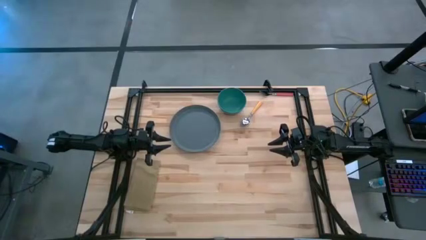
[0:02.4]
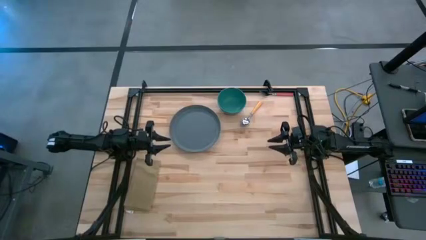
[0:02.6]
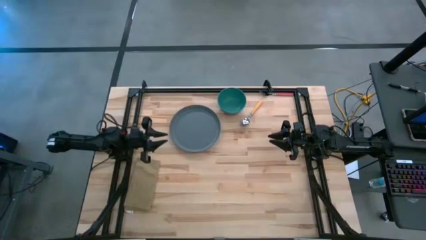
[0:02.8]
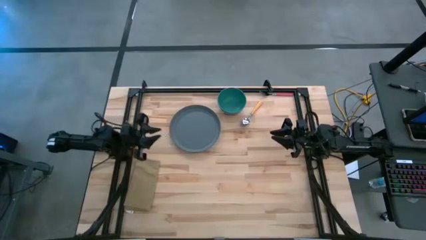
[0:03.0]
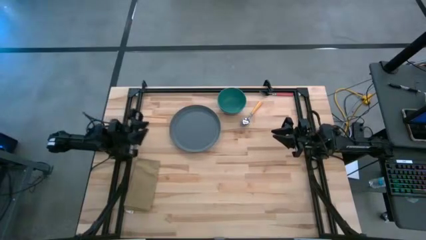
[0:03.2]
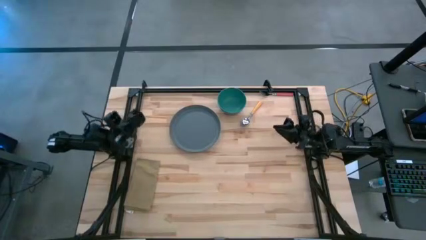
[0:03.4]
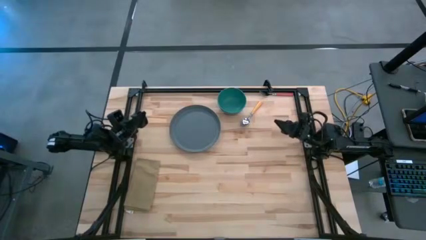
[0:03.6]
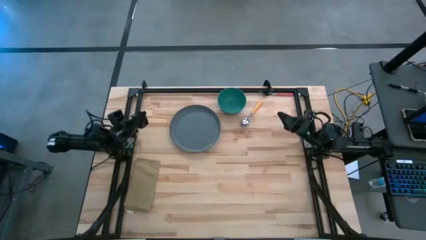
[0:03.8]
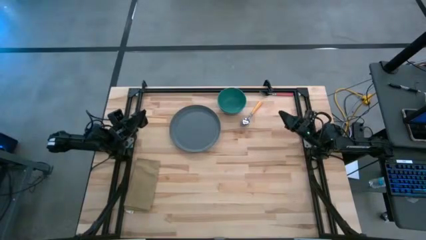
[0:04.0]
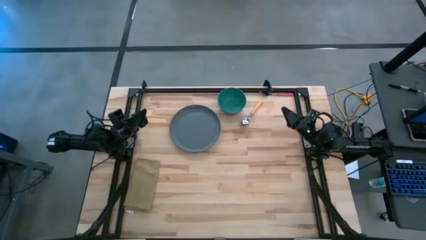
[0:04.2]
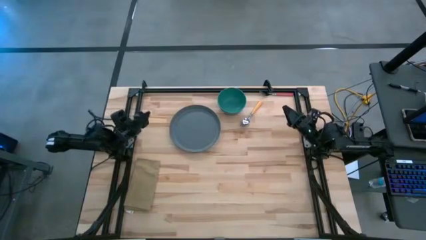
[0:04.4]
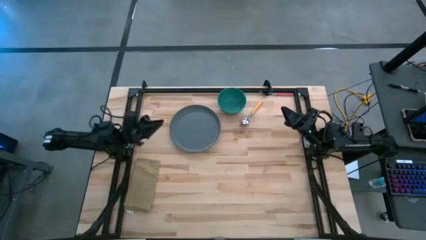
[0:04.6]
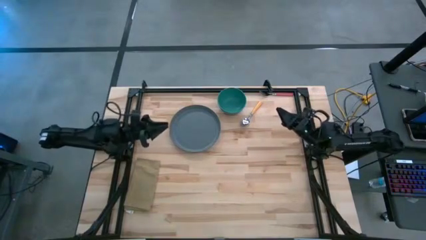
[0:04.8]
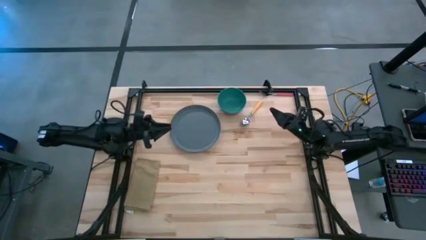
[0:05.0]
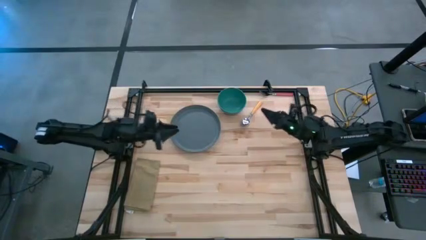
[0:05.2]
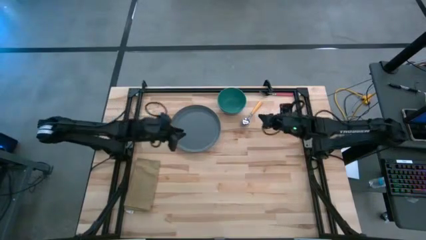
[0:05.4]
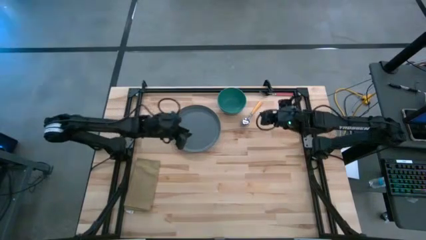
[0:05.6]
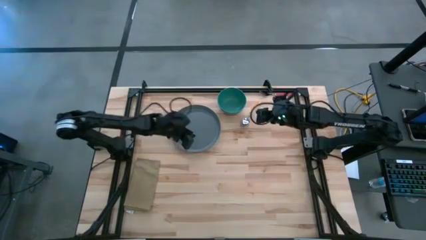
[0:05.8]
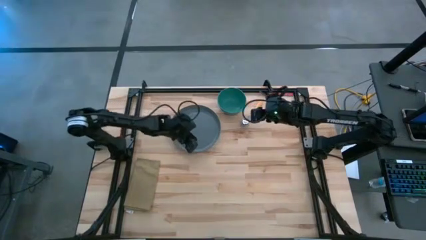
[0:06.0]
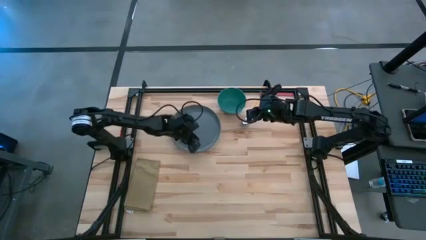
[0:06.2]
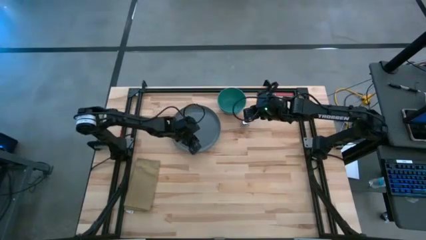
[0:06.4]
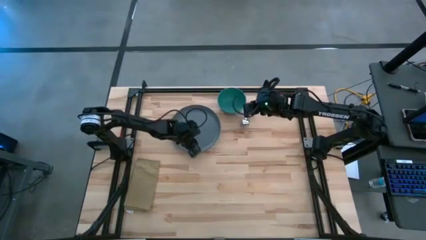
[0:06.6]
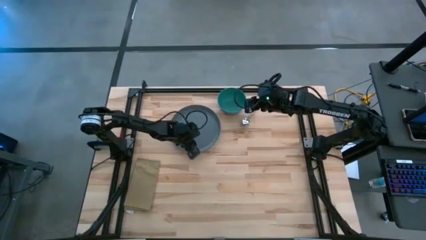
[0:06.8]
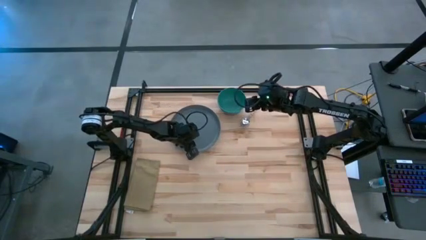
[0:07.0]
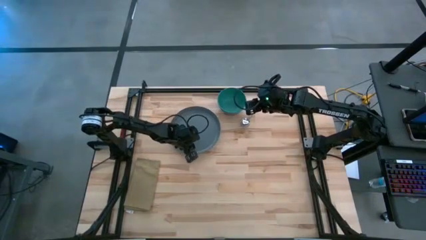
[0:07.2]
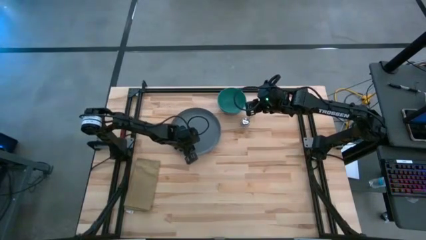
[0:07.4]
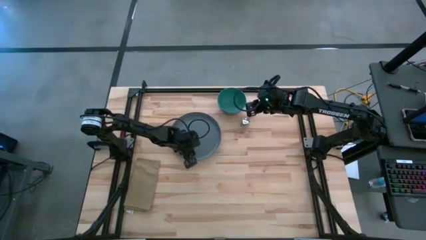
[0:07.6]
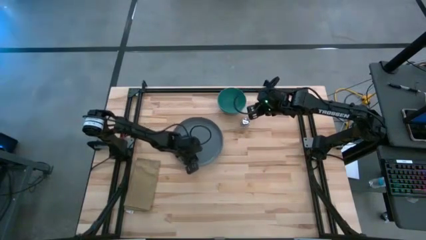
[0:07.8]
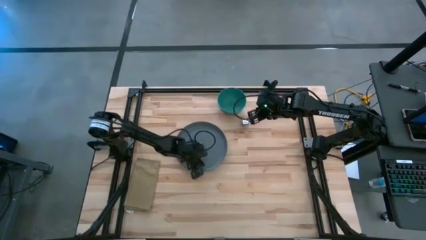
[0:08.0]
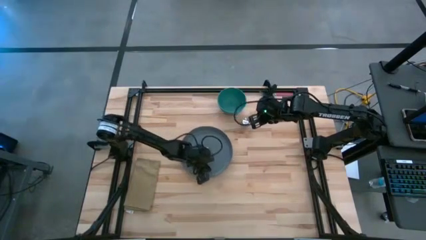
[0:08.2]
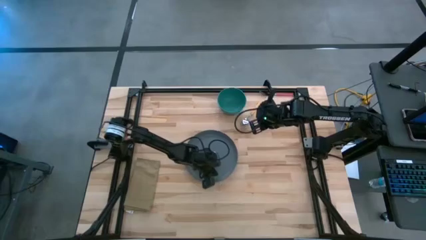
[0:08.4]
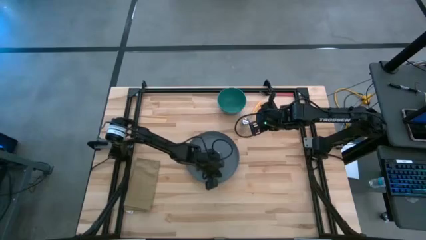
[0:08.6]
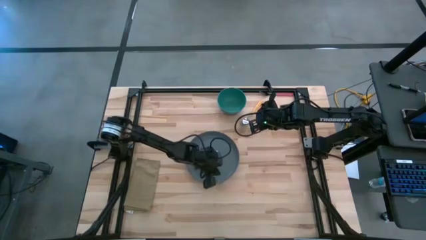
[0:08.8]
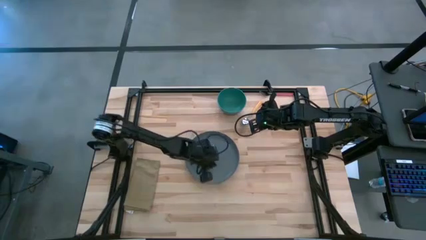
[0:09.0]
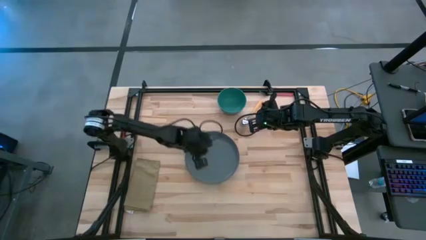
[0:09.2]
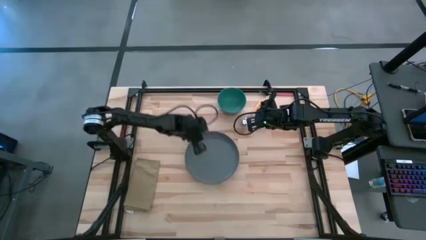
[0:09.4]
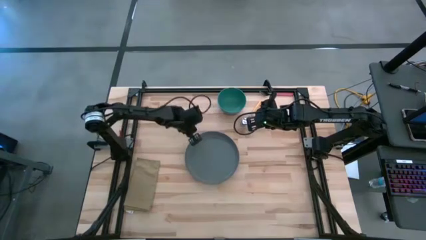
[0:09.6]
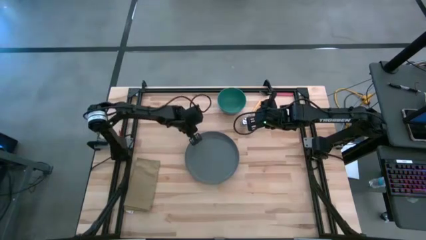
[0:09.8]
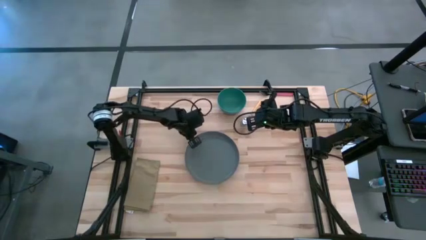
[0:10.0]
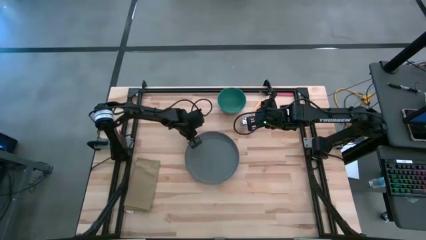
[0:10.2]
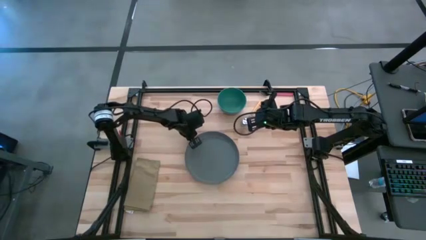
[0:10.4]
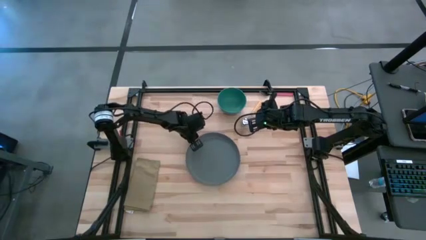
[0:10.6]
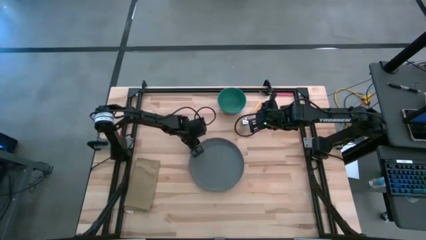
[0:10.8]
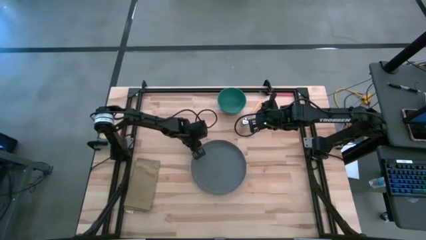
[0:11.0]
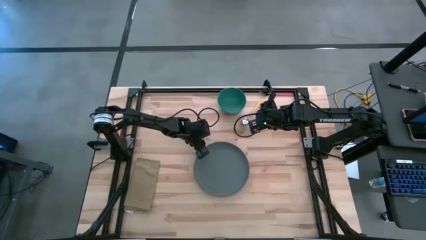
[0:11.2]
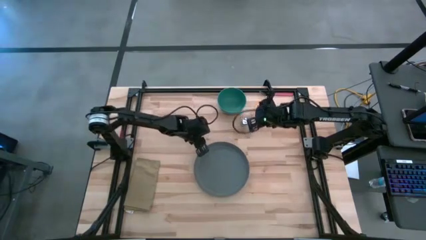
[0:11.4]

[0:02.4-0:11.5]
Task: Set table place
Move the gray plate to the center of the table

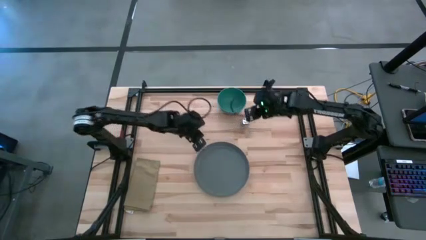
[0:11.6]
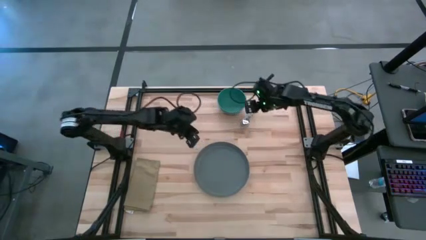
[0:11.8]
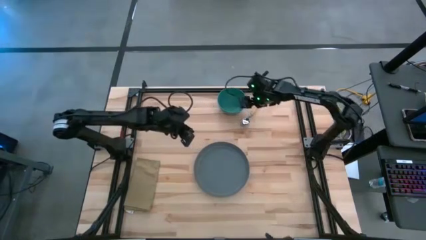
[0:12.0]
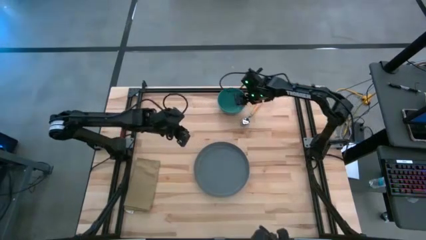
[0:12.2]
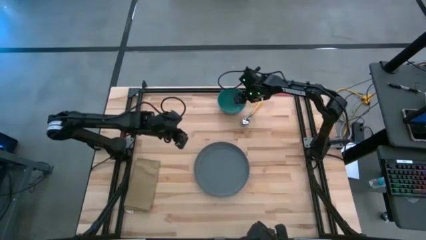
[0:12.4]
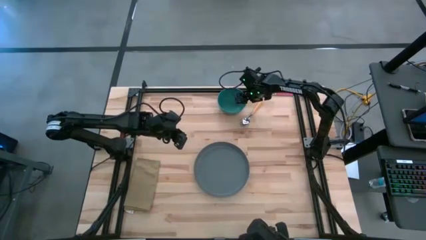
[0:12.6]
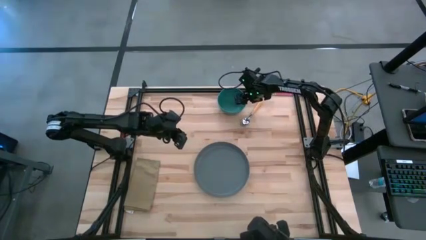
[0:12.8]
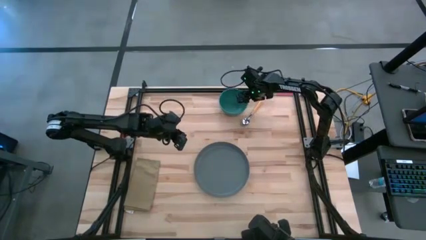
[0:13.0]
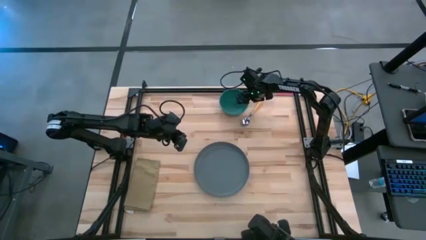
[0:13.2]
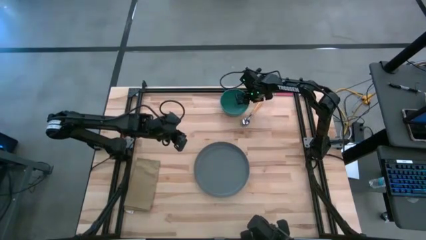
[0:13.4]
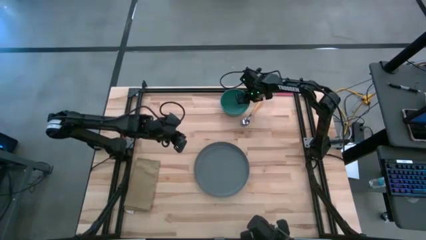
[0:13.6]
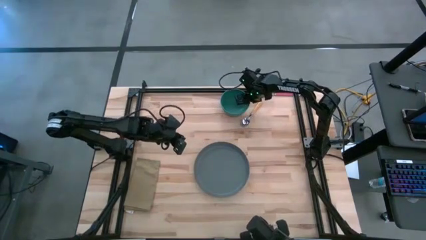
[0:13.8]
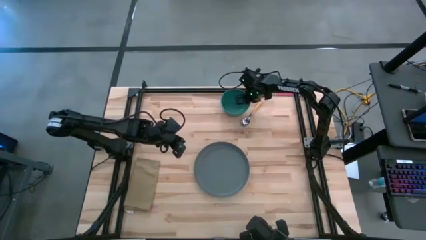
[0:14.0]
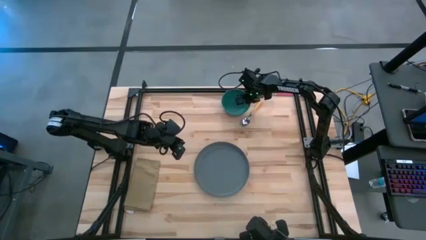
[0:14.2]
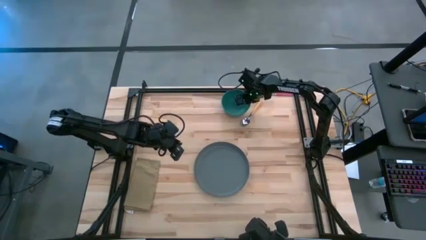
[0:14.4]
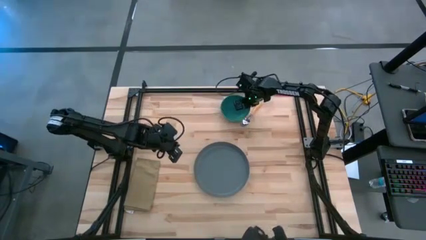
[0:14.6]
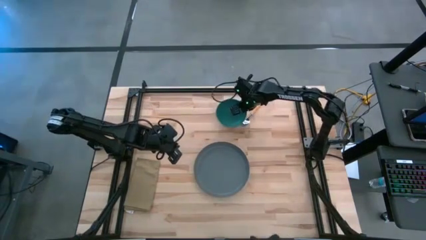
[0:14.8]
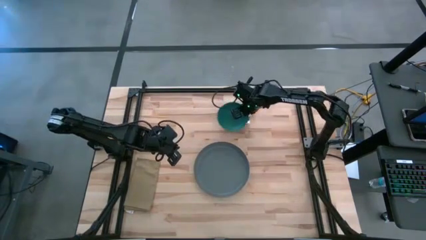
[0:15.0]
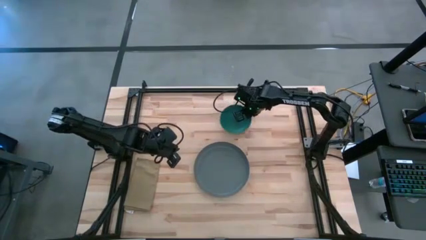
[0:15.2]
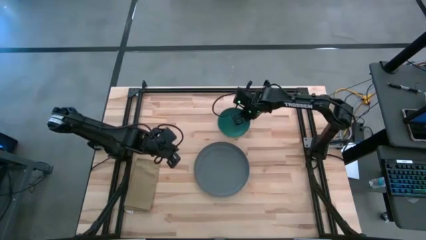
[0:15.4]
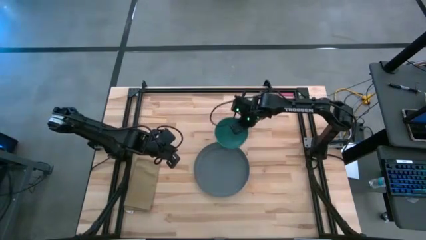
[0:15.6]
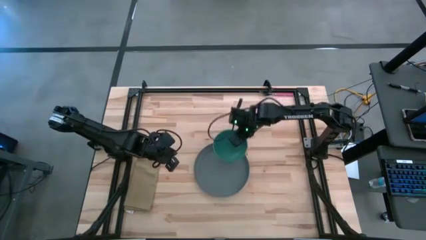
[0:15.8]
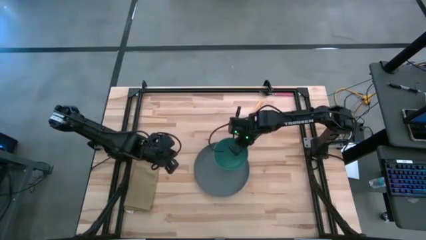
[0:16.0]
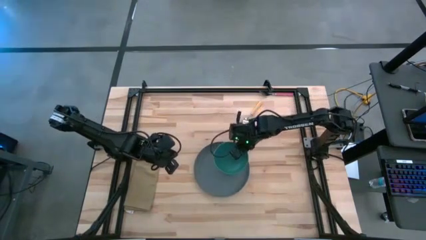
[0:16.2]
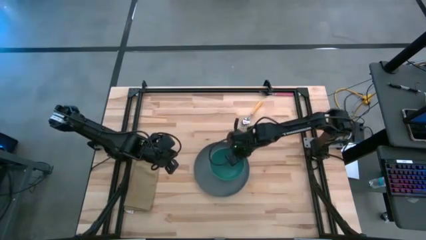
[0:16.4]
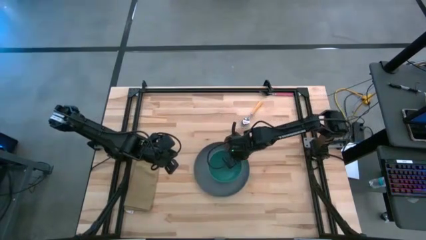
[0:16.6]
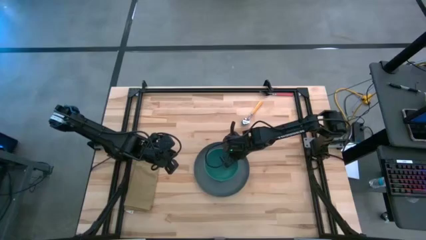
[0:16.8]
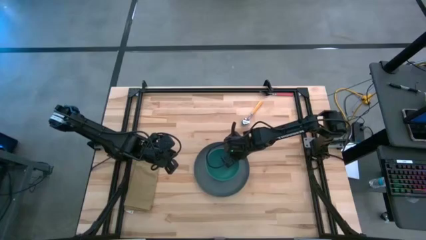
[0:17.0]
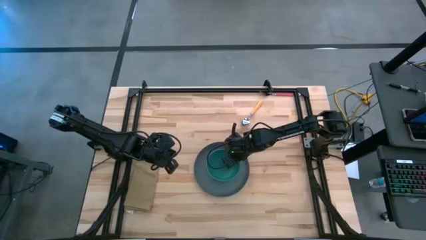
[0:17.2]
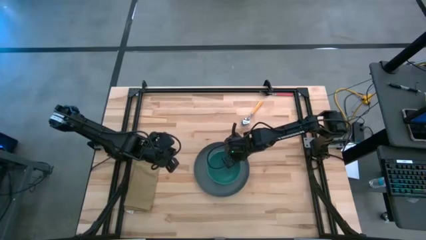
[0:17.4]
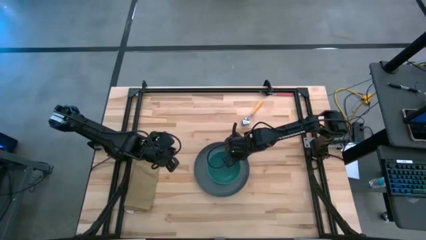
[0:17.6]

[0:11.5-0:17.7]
Put the green bowl on top of the gray plate
